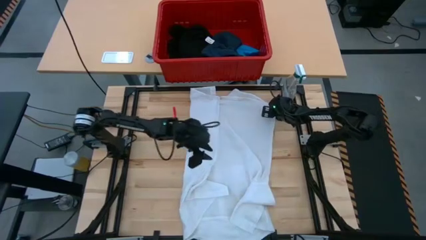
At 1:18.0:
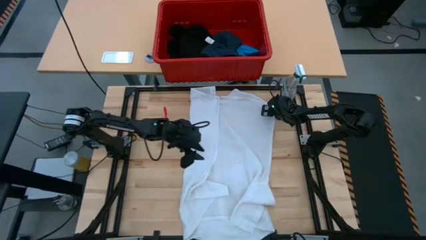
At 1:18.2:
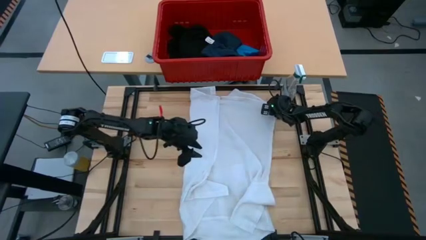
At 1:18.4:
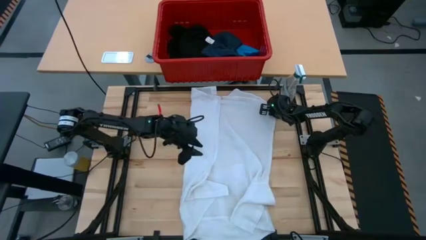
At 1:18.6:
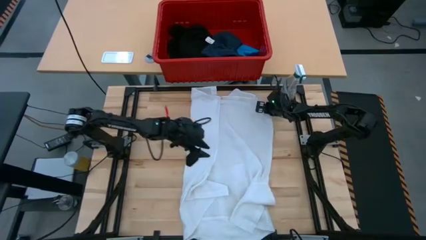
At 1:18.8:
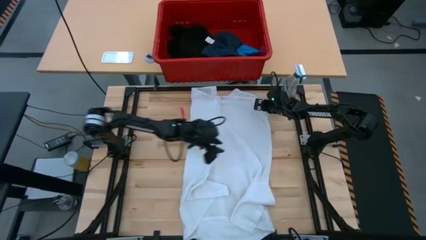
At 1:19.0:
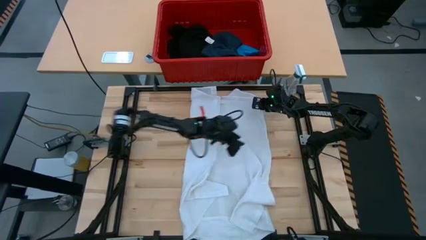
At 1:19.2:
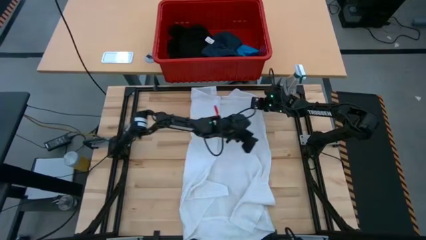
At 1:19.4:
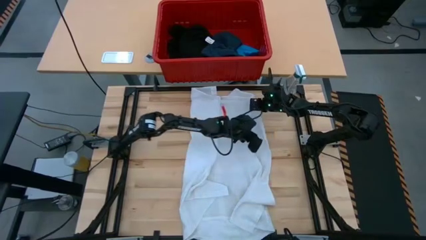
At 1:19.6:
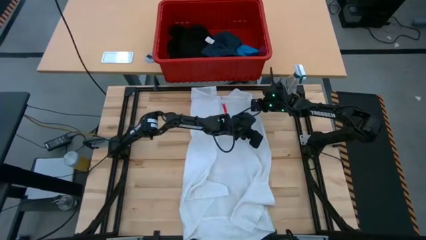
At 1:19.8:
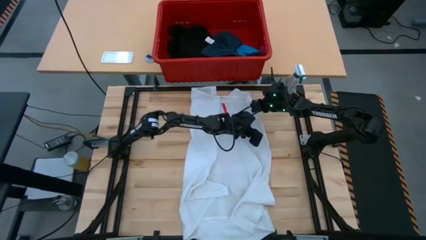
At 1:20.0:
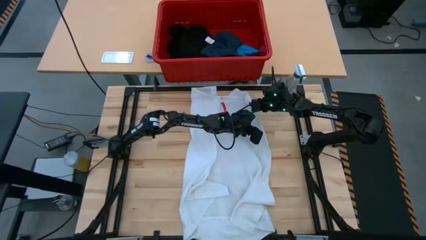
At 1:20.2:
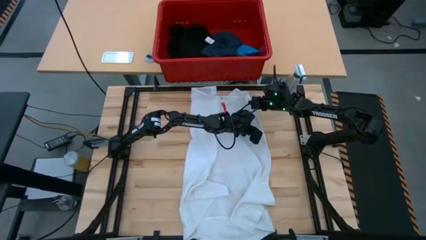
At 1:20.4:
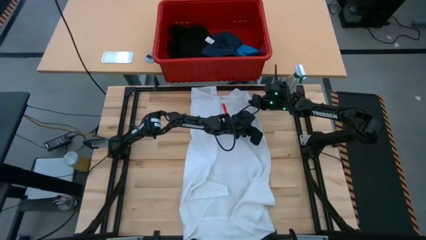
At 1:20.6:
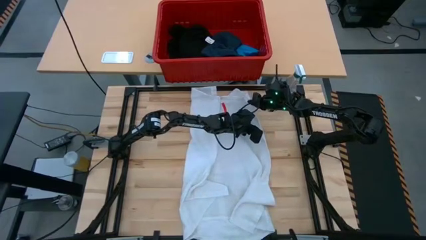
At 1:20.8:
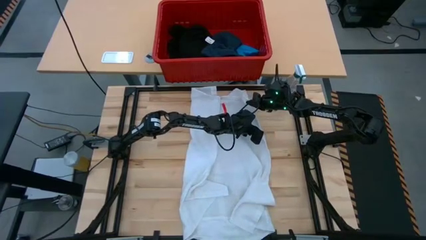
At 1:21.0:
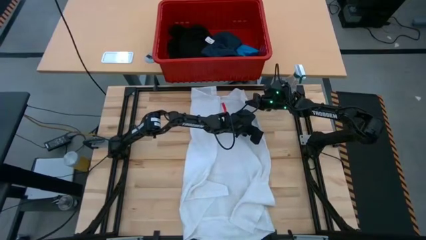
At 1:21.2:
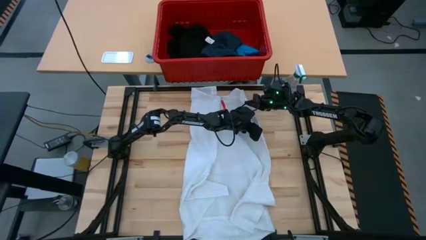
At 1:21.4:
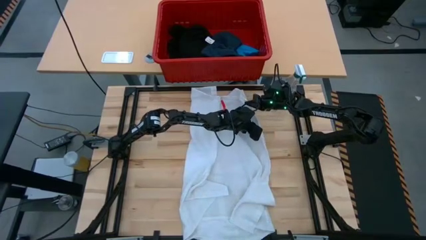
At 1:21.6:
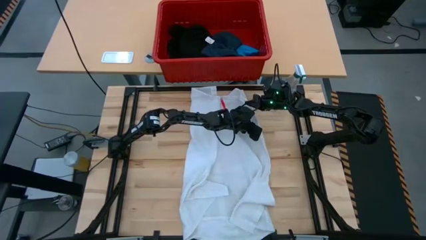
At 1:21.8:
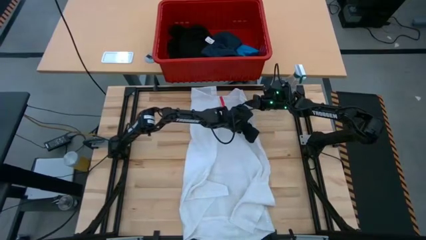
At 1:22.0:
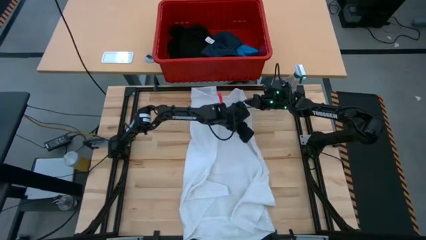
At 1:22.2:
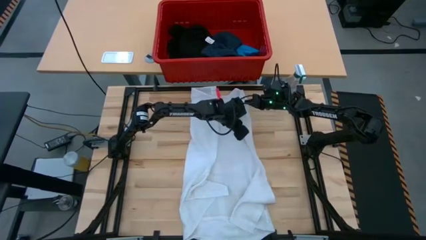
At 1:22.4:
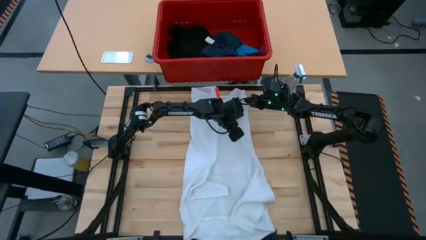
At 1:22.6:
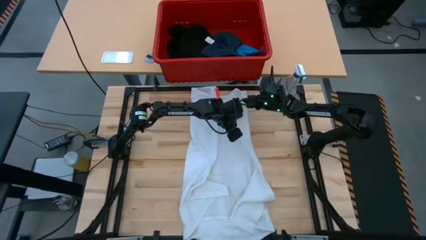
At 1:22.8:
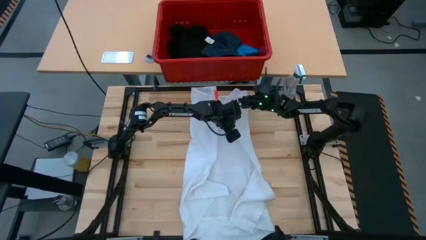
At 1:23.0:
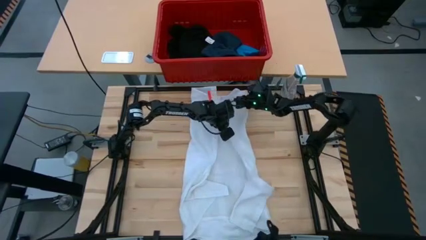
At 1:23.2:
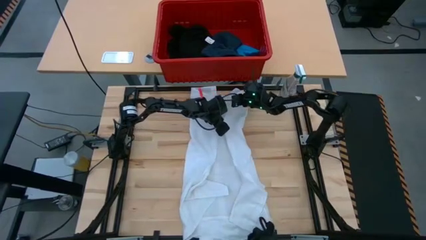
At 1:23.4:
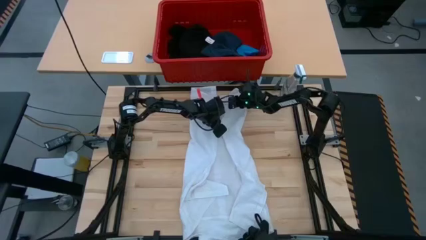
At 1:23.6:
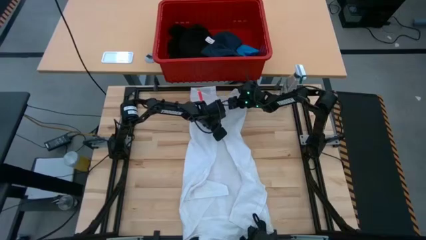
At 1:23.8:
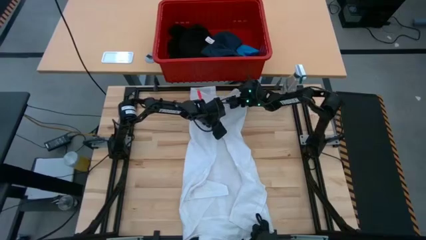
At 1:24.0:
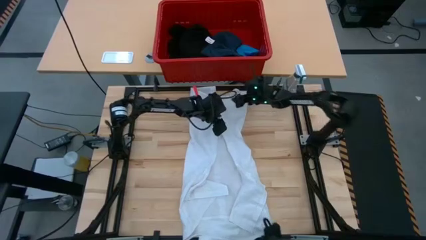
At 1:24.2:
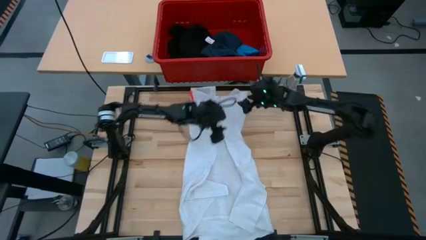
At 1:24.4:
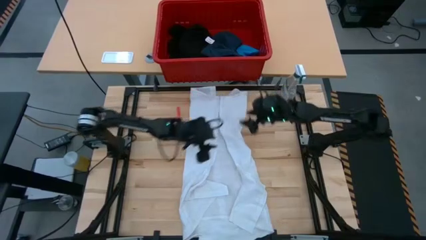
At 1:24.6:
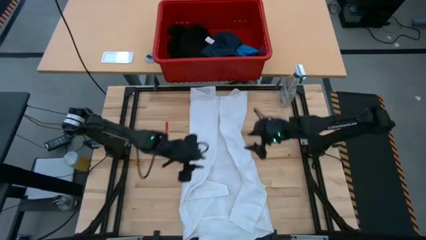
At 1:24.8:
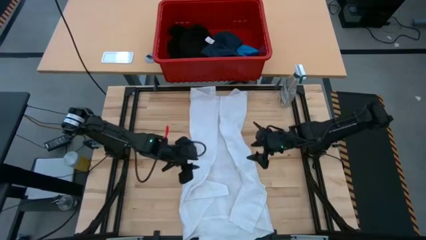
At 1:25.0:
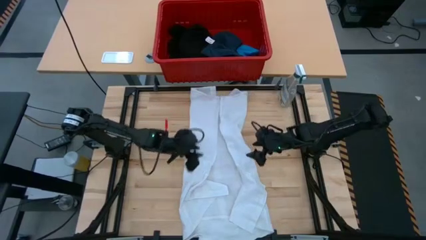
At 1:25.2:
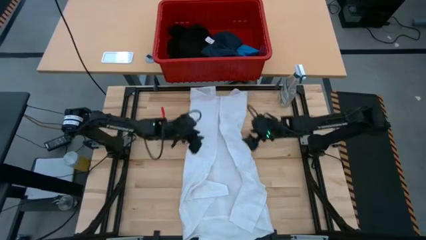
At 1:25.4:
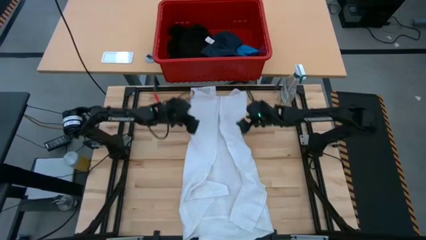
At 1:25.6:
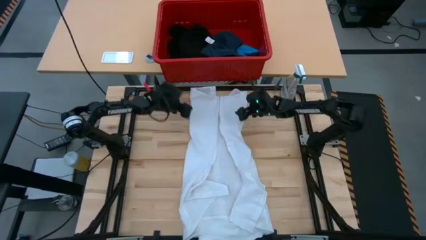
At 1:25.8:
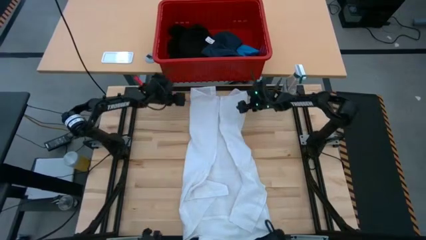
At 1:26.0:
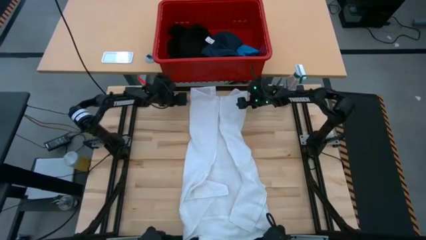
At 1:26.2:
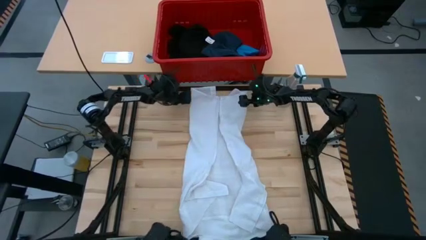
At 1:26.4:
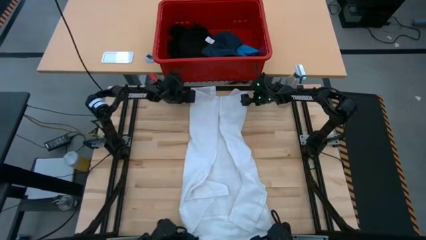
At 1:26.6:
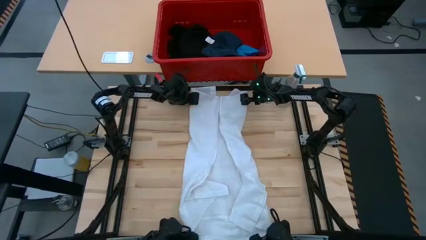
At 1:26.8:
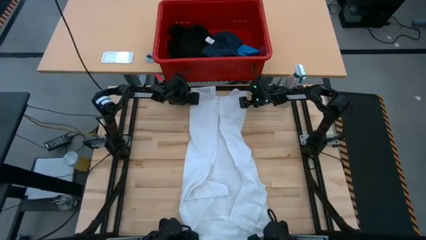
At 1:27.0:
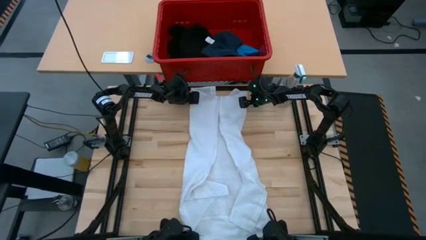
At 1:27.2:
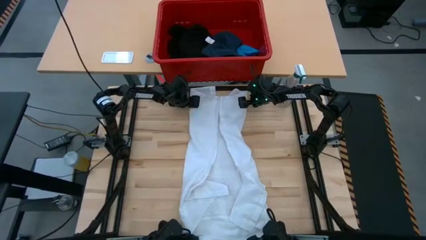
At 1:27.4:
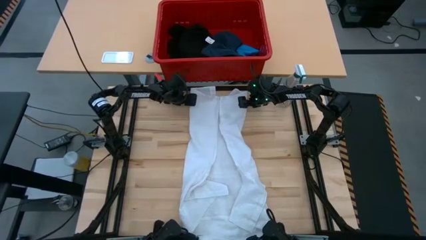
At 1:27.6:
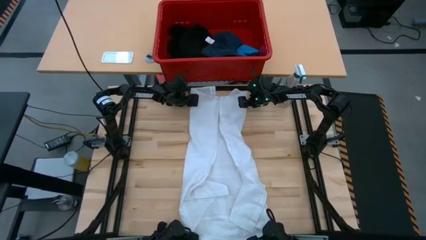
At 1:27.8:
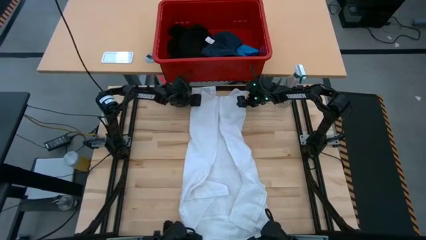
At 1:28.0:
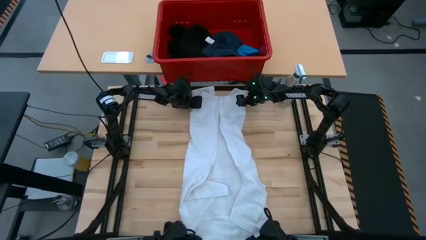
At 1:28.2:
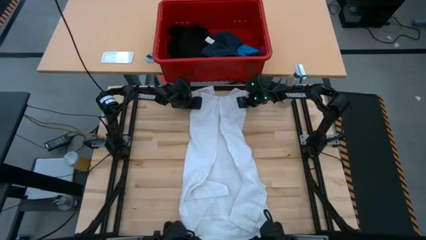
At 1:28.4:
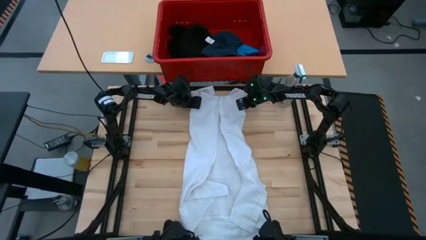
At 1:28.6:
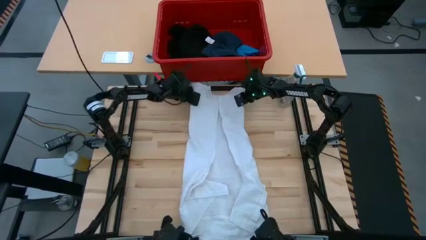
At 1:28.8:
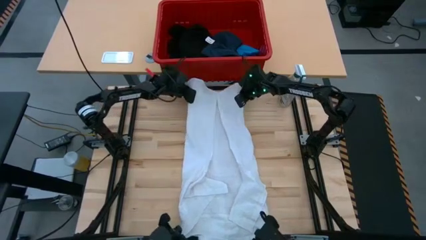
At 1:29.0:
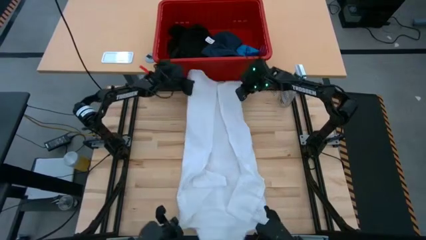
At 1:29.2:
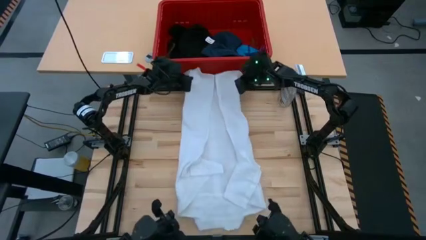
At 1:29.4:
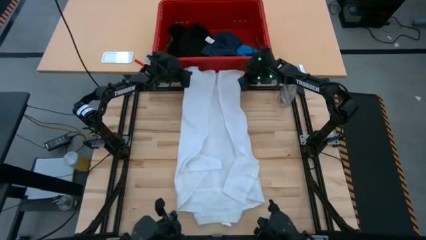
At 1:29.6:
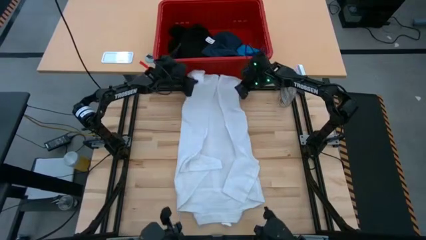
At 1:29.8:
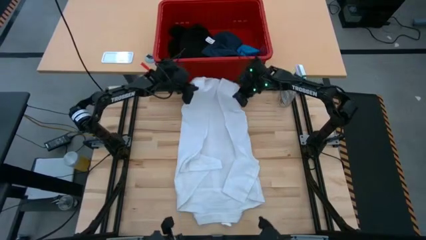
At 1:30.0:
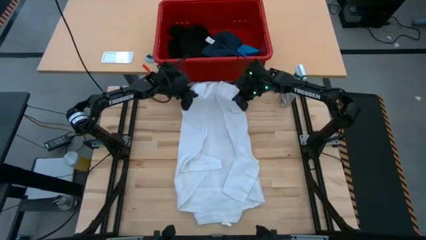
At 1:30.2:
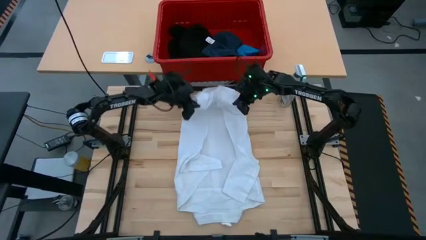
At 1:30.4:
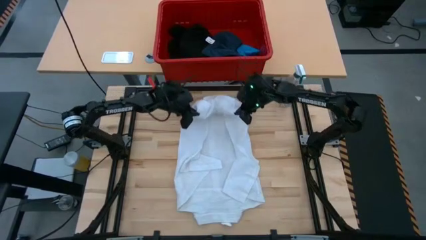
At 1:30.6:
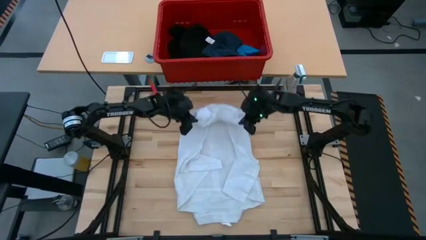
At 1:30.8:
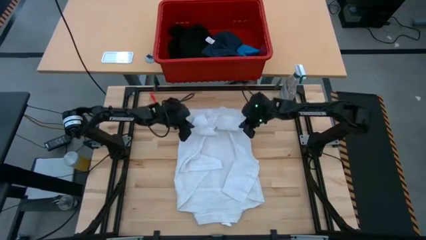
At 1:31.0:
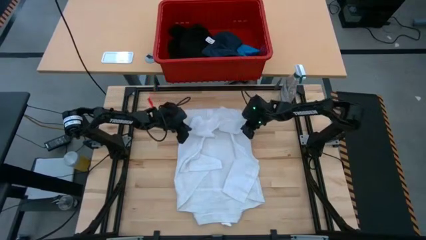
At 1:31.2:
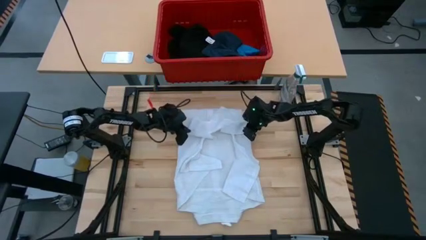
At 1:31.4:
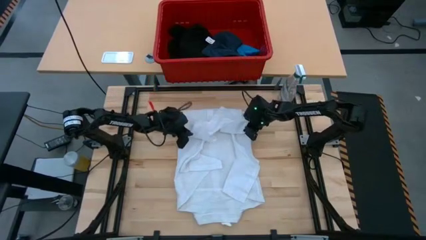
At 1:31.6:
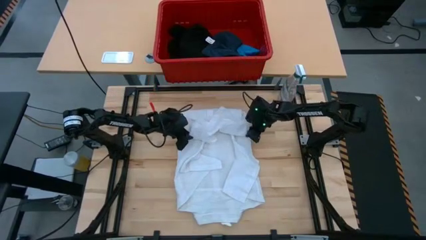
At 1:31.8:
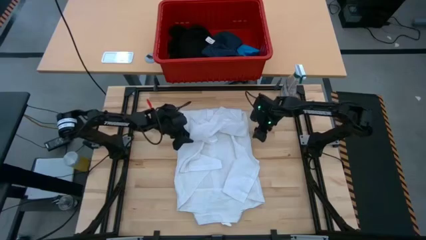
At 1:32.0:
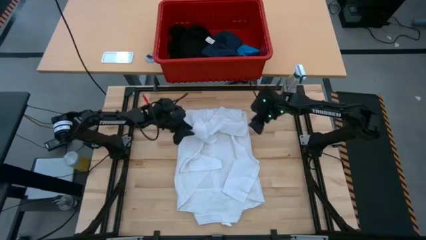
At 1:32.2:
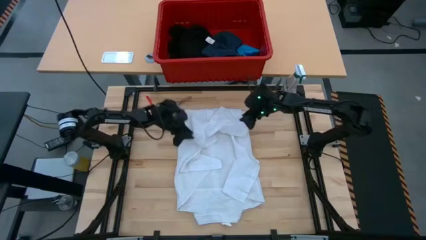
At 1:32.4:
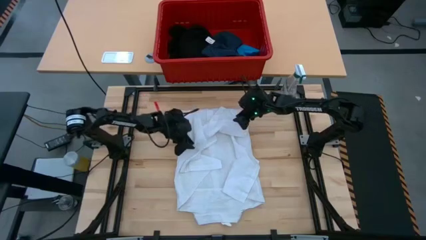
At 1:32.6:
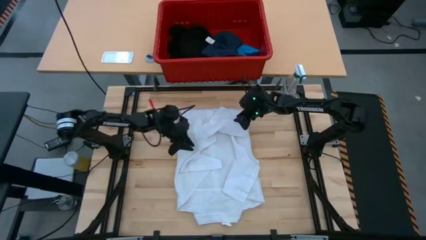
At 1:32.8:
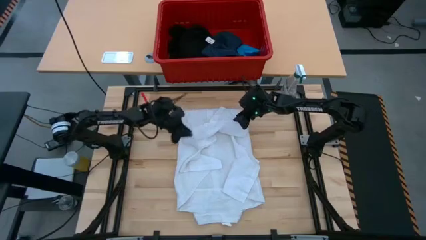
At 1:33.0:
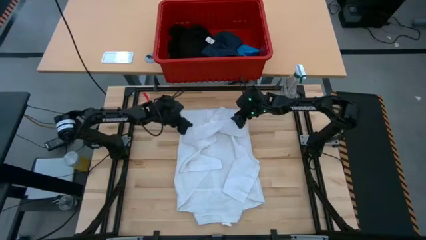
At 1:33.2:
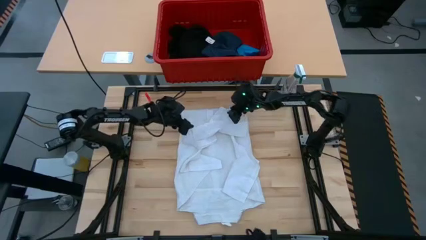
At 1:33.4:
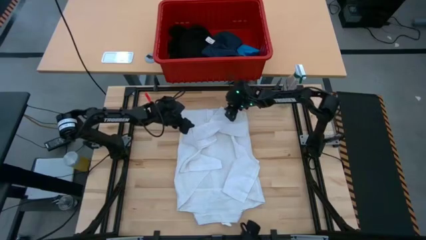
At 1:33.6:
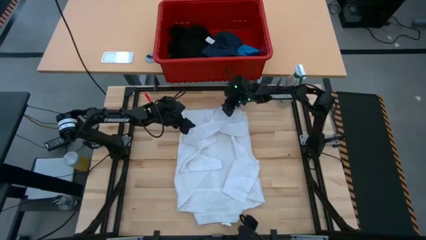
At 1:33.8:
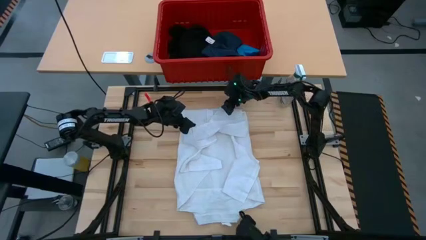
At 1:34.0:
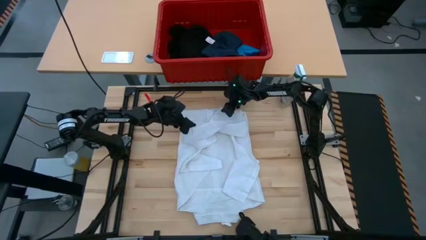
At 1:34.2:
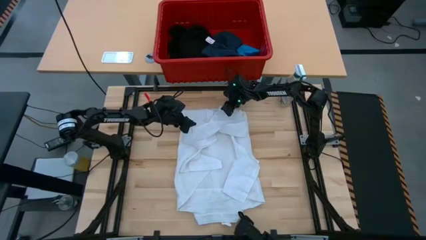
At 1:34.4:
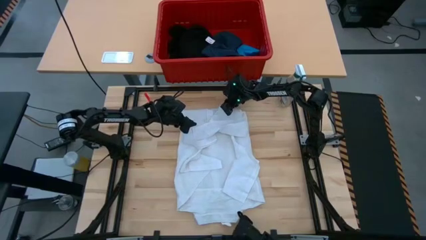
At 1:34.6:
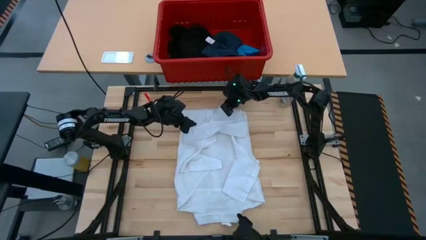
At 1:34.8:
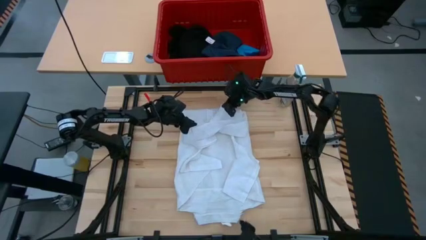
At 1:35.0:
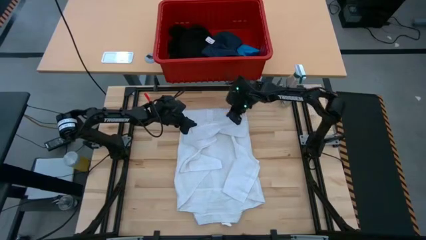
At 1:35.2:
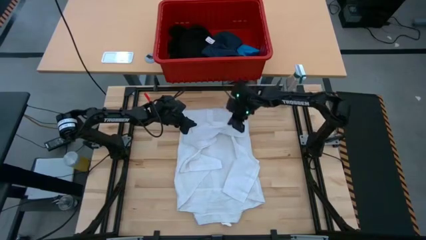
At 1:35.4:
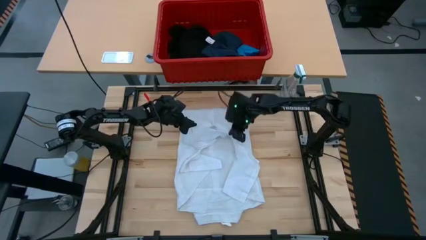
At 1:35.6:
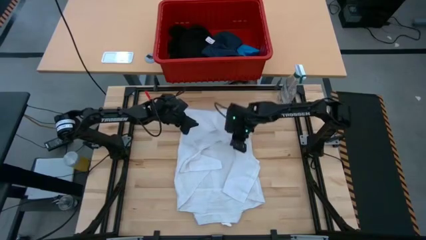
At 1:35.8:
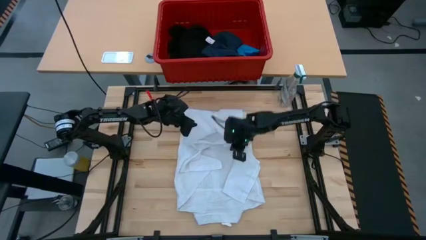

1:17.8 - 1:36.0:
Task: Fold Laundry from Bin
Fold the white polo shirt
